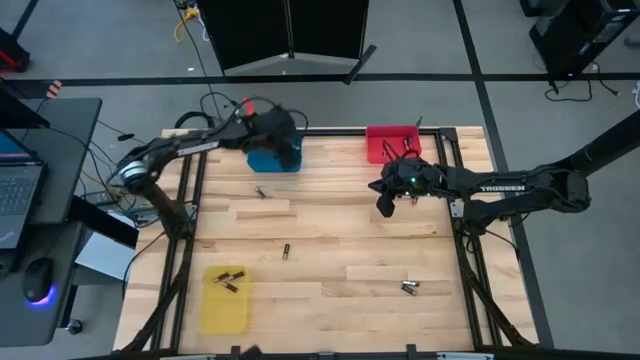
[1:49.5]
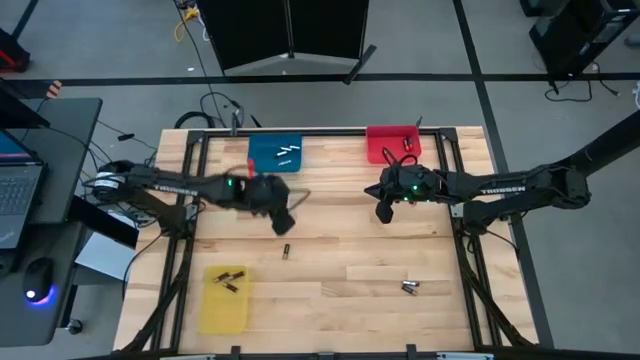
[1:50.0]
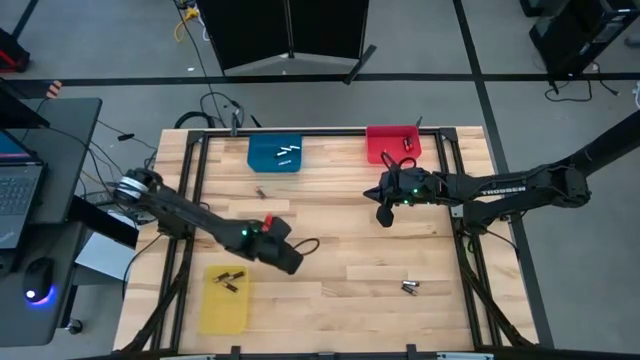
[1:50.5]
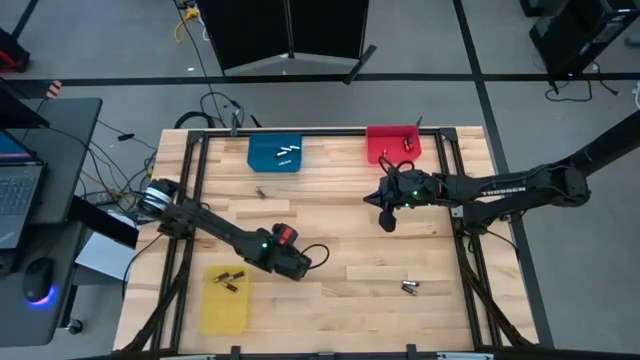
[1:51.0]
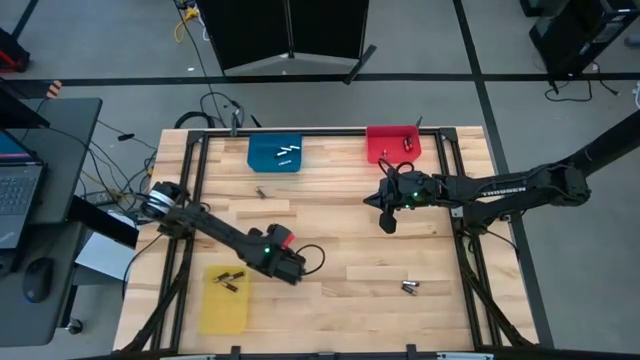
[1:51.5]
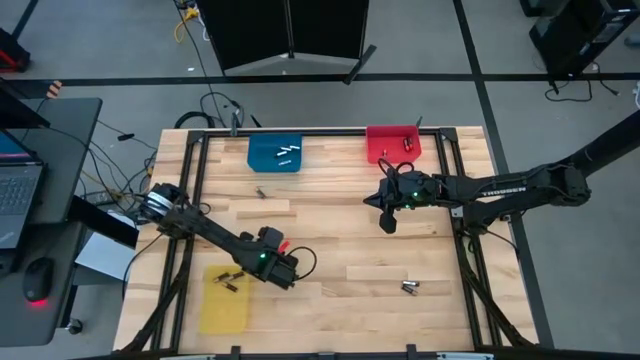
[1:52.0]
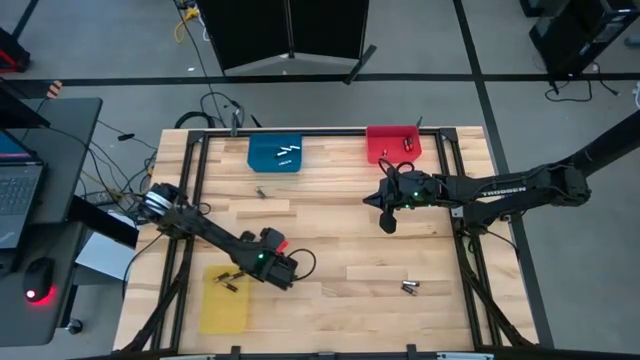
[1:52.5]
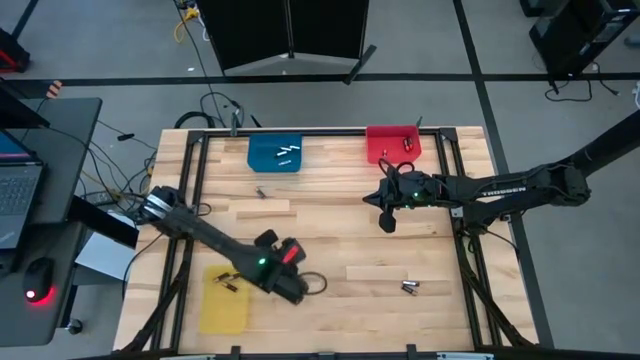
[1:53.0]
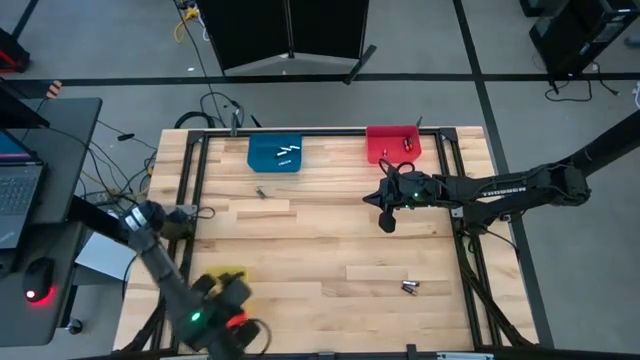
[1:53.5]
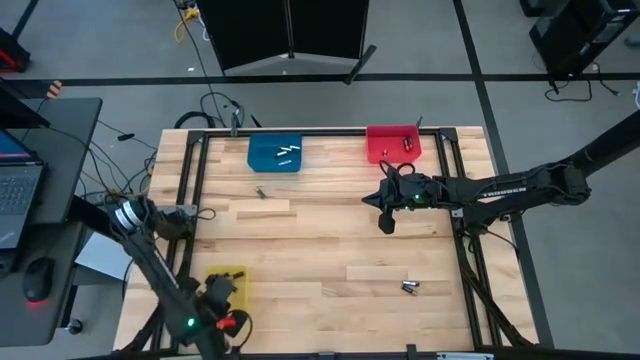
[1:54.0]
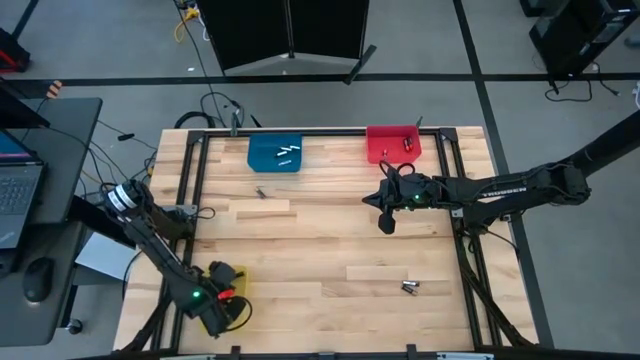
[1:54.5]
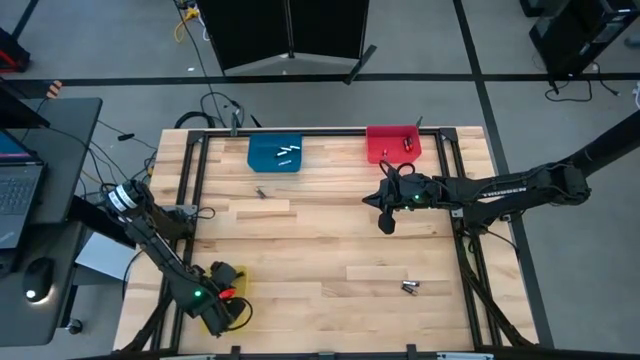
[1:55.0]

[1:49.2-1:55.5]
Task: Sort batteries
Put the black-brown battery into the yellow bin

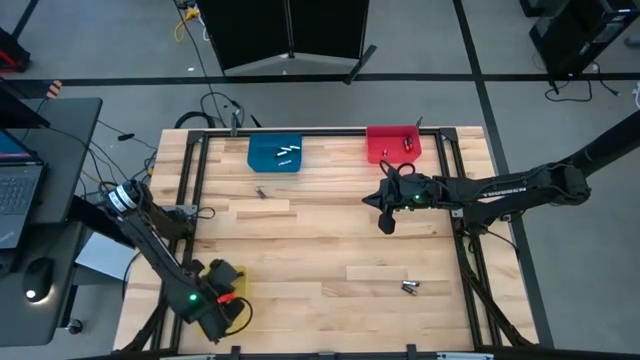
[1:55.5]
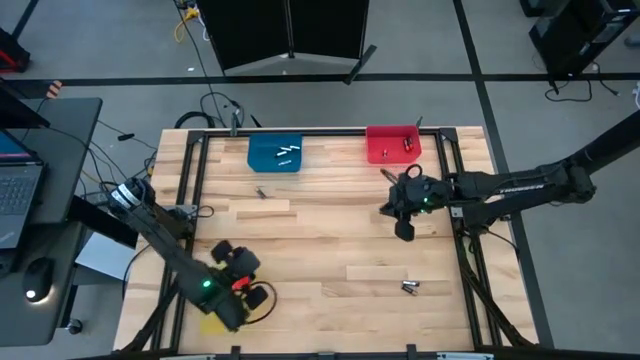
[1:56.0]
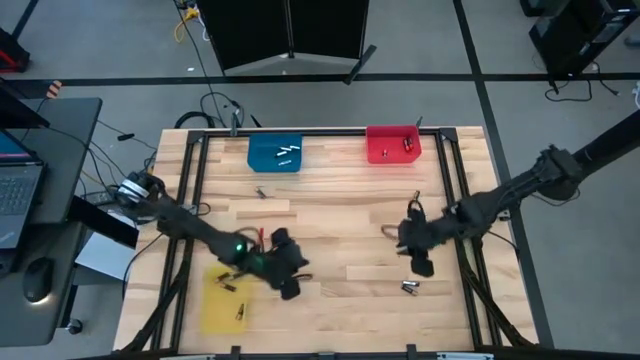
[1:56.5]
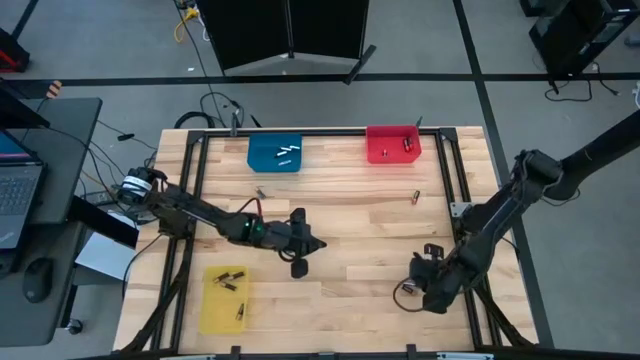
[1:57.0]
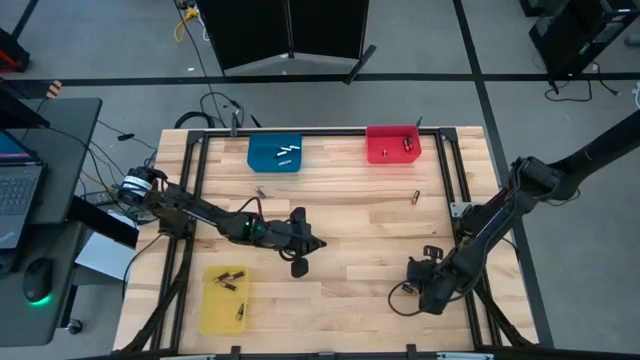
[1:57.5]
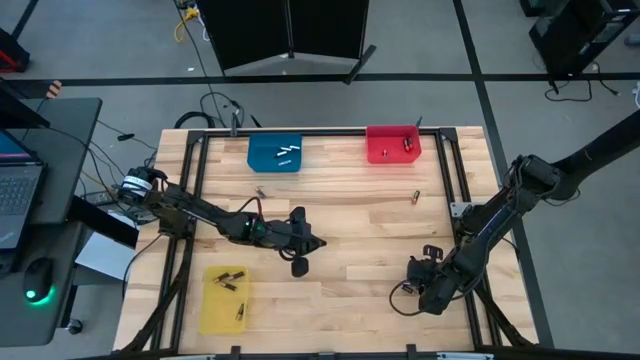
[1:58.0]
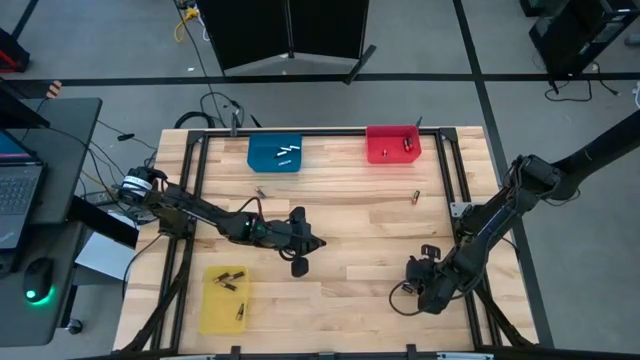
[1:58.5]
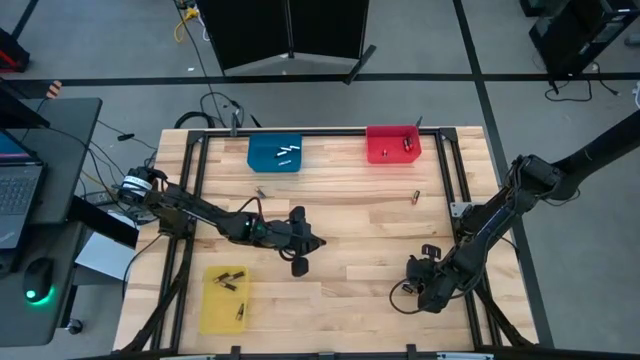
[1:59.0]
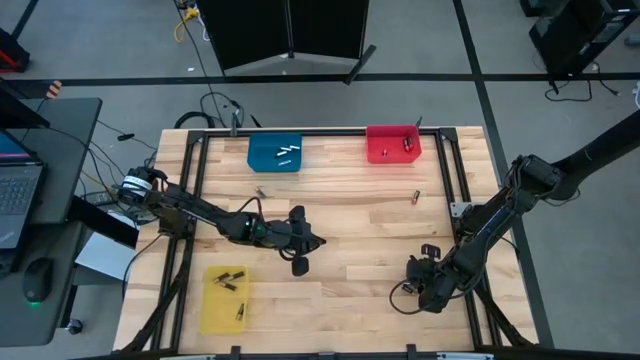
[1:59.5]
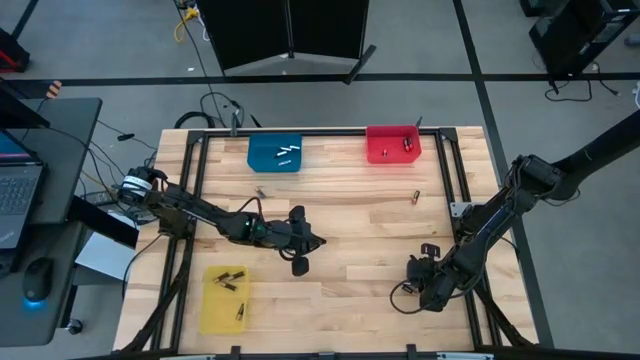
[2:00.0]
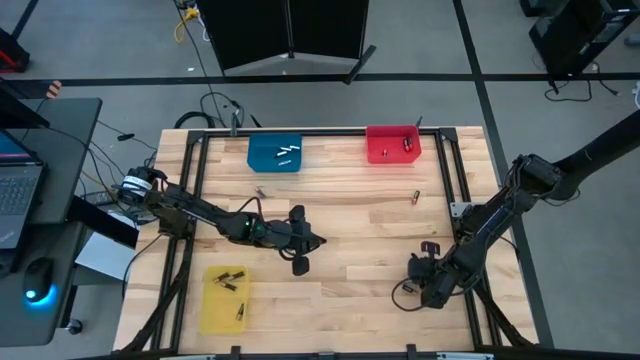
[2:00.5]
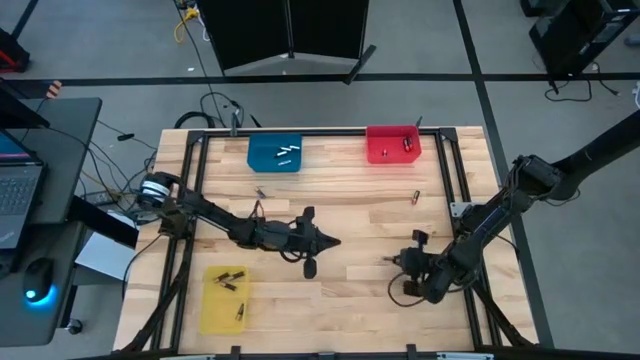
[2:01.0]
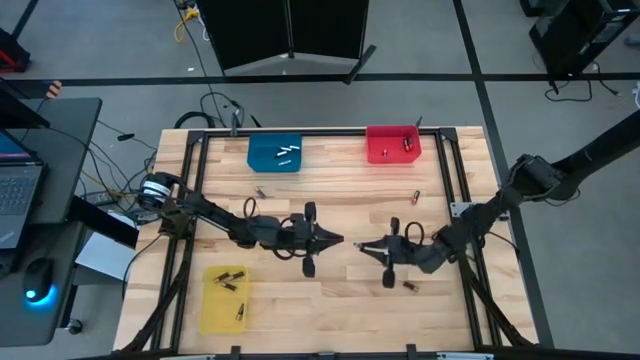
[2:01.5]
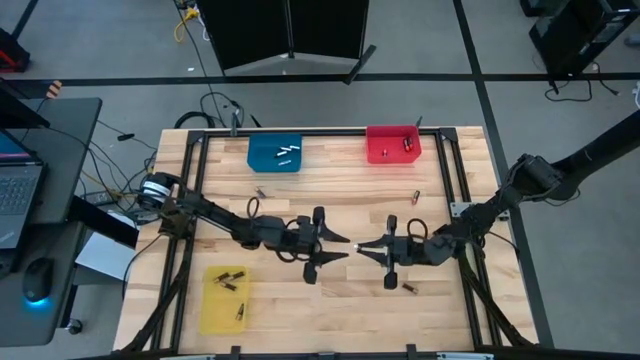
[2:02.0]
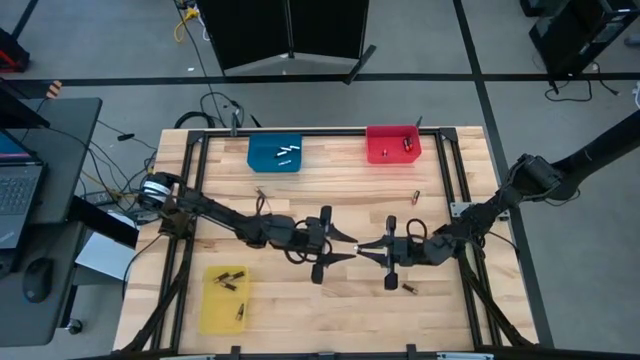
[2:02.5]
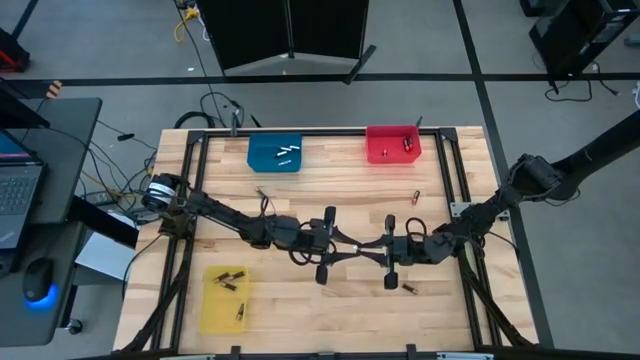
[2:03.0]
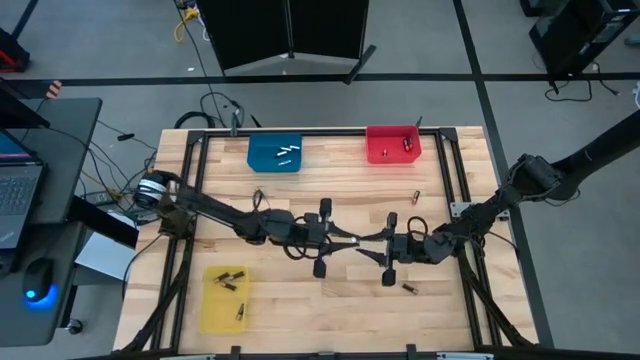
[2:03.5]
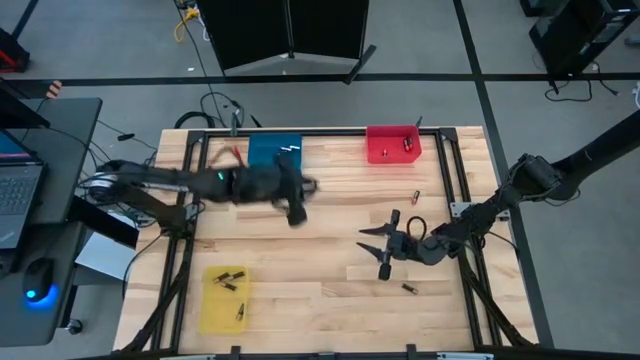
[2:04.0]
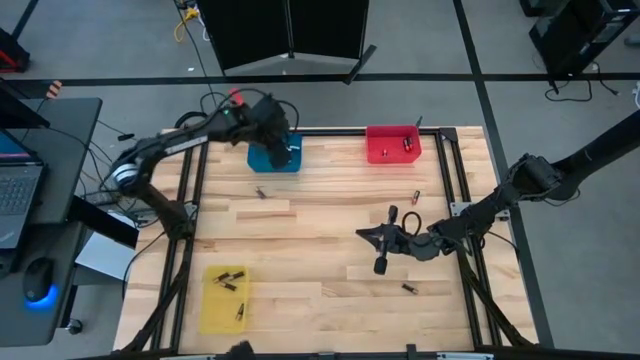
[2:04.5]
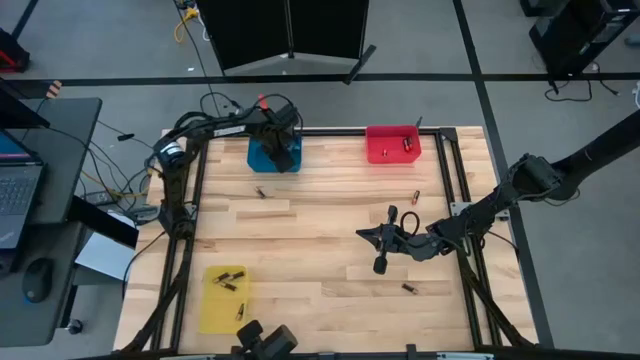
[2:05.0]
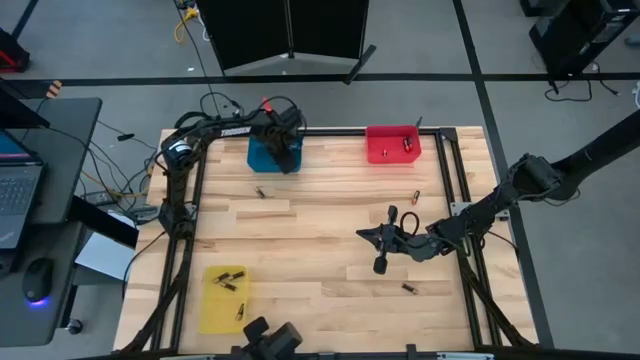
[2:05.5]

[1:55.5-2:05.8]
Put the silver battery into the blue bin

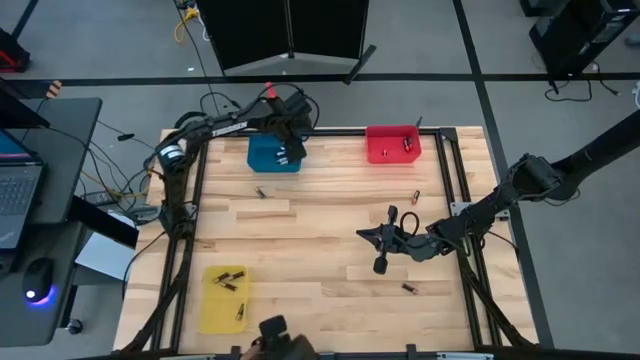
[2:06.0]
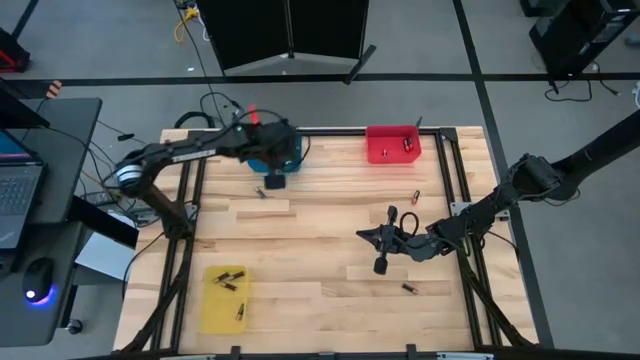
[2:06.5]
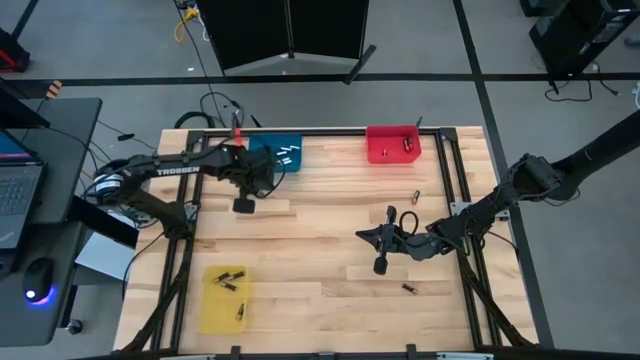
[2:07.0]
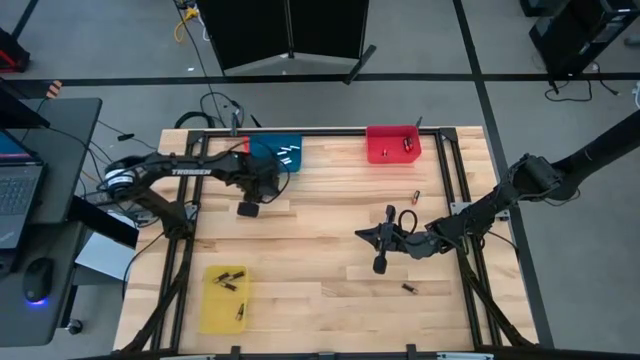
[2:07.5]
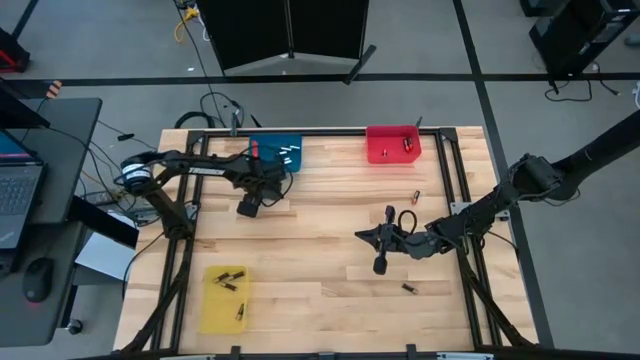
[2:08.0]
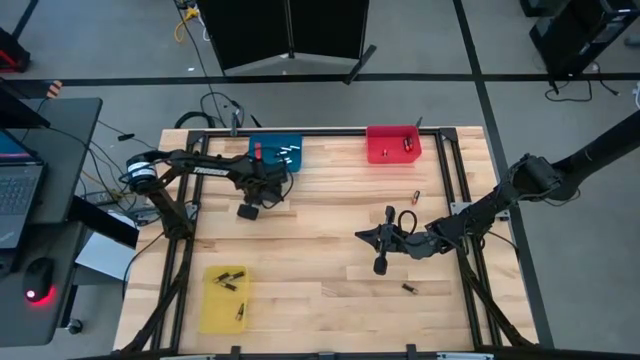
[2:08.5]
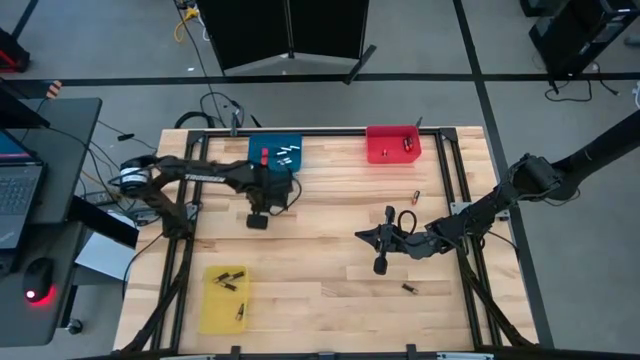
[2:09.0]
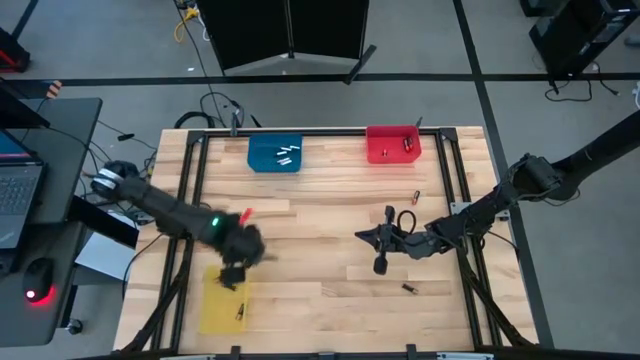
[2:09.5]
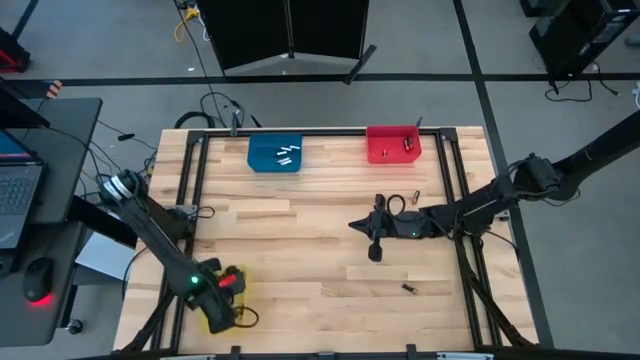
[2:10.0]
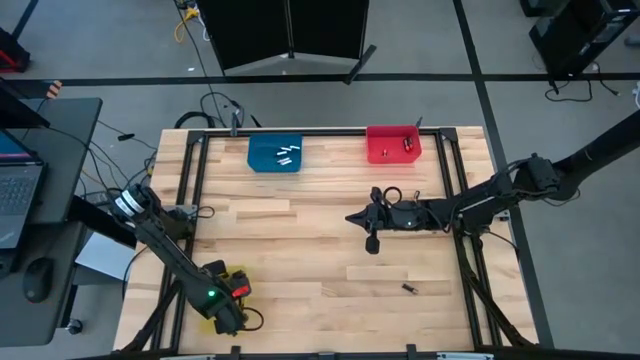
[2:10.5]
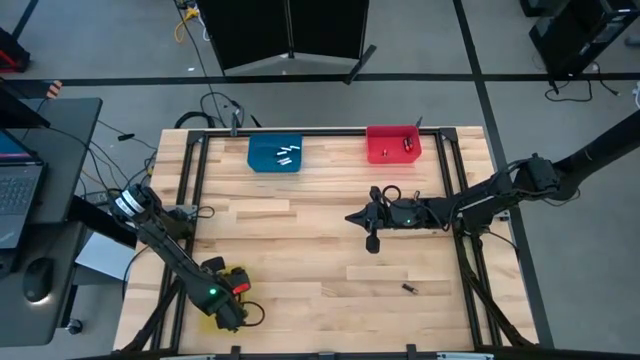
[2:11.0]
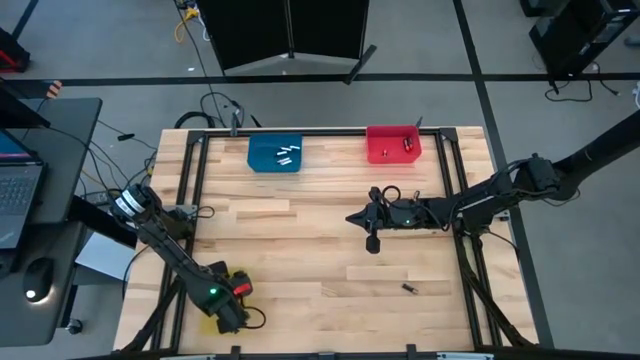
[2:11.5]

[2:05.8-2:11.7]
Put the black-brown battery into the yellow bin
